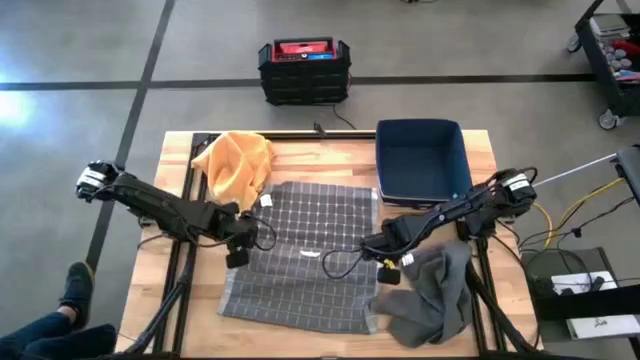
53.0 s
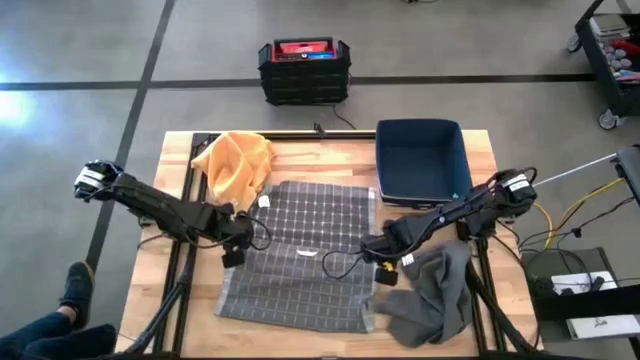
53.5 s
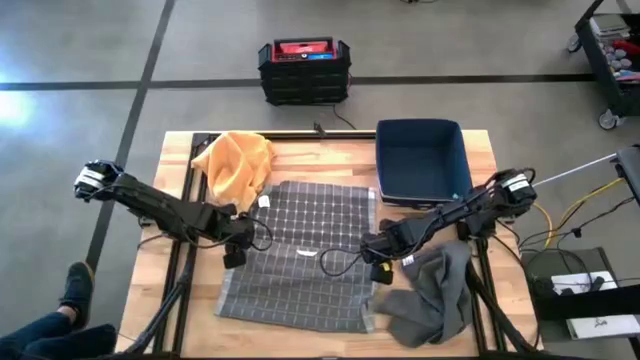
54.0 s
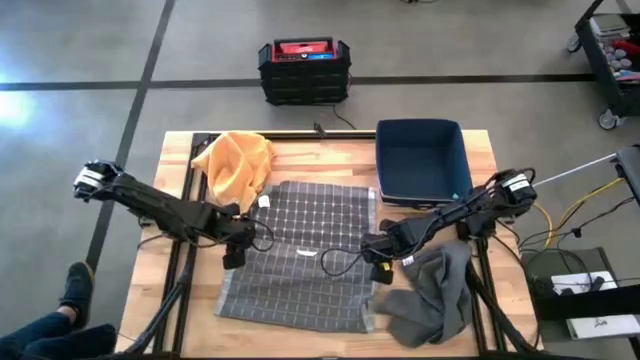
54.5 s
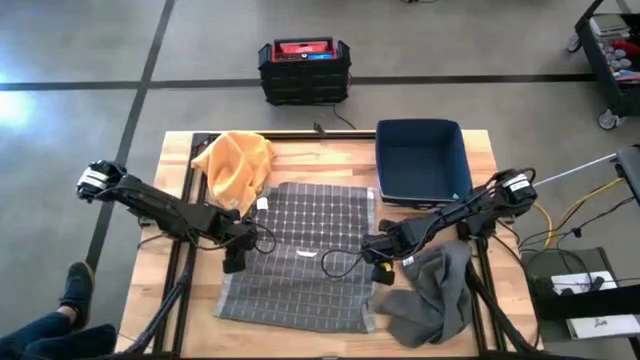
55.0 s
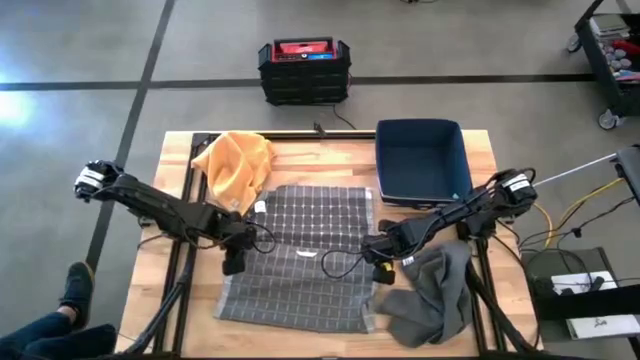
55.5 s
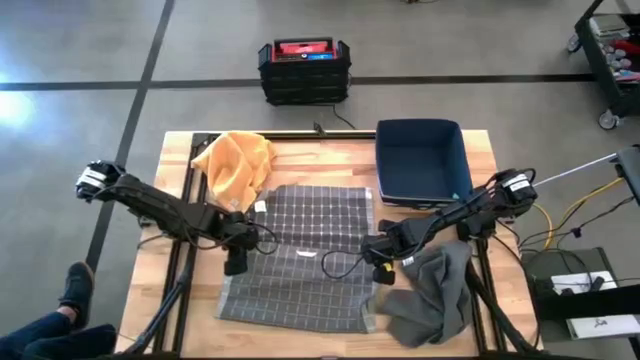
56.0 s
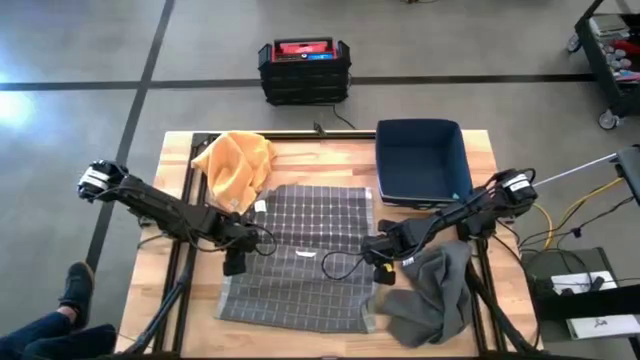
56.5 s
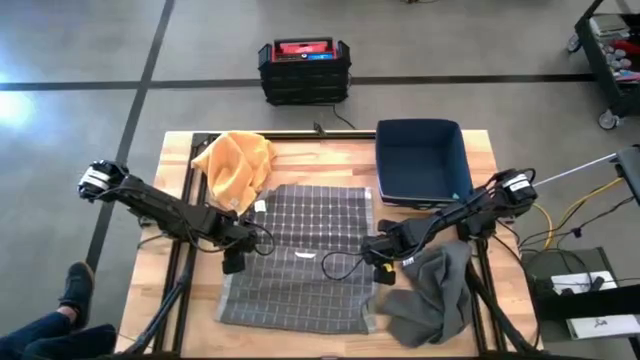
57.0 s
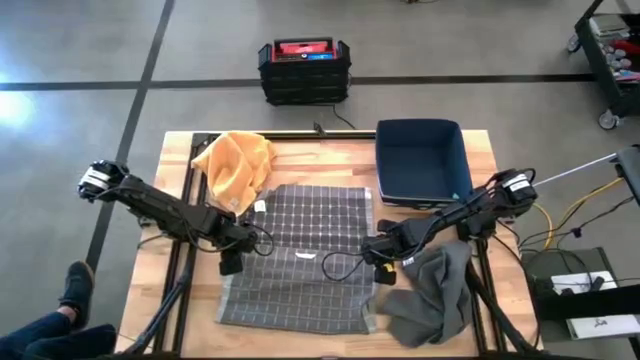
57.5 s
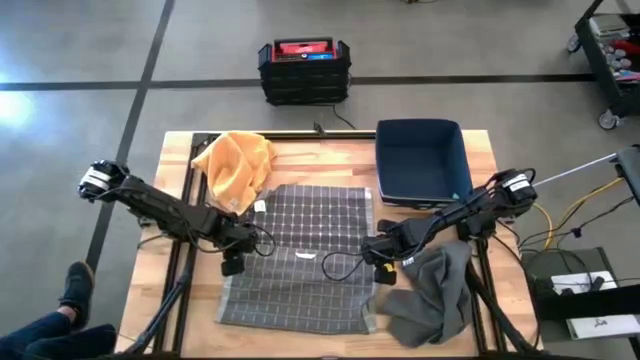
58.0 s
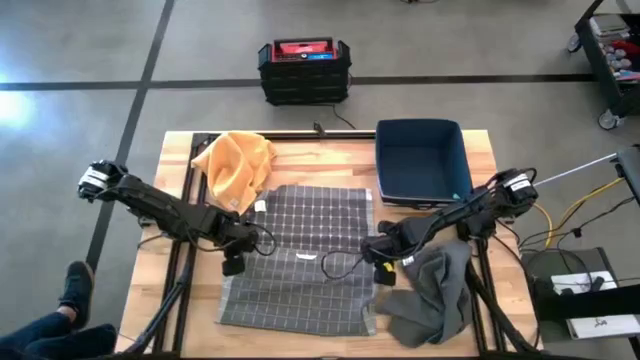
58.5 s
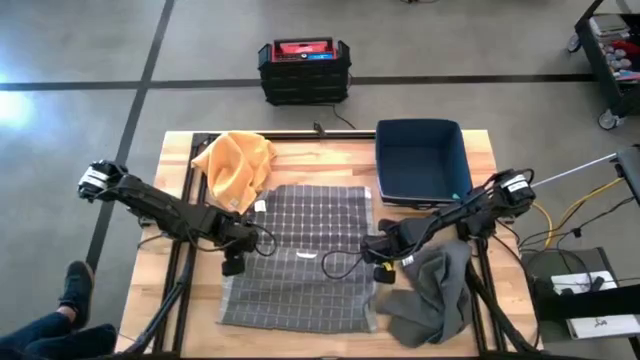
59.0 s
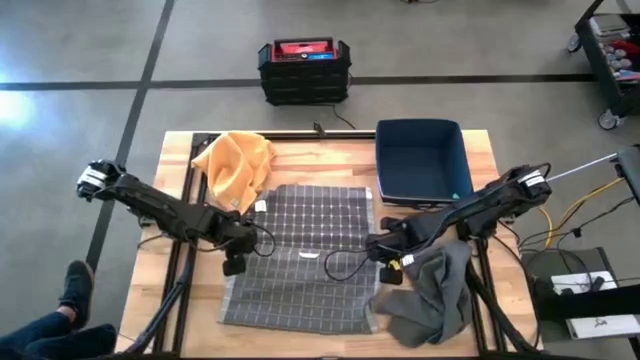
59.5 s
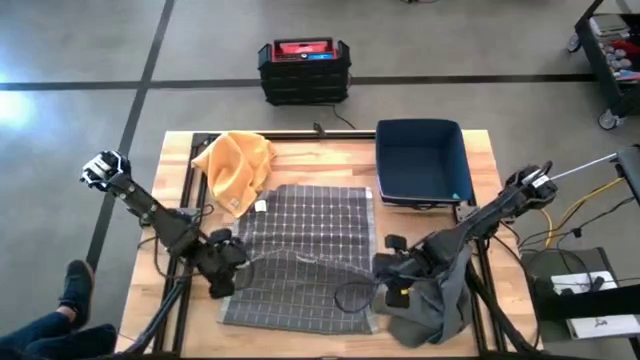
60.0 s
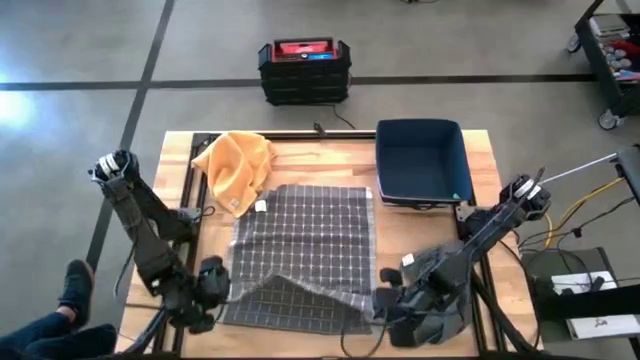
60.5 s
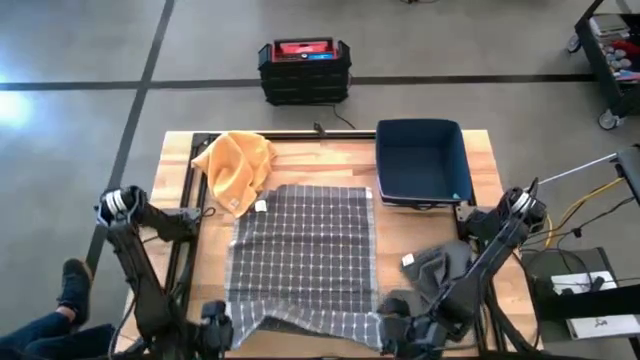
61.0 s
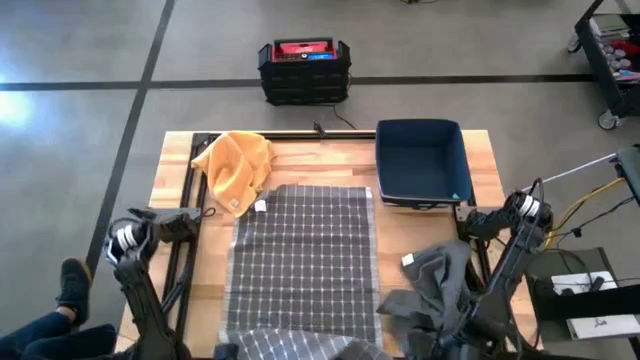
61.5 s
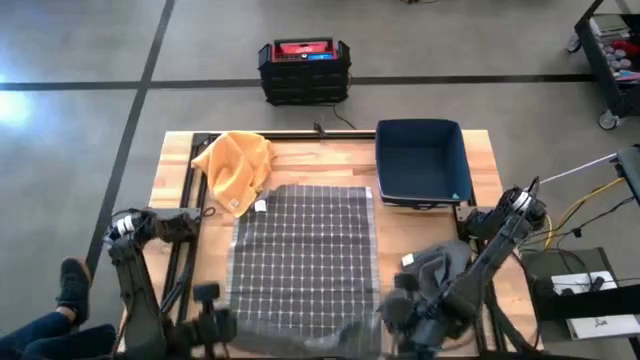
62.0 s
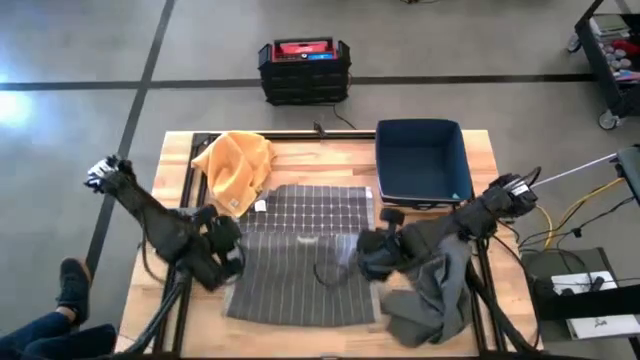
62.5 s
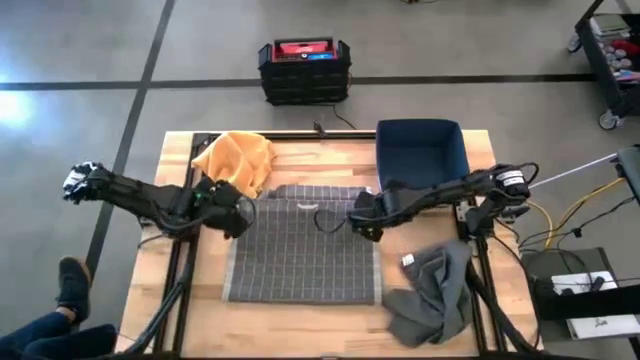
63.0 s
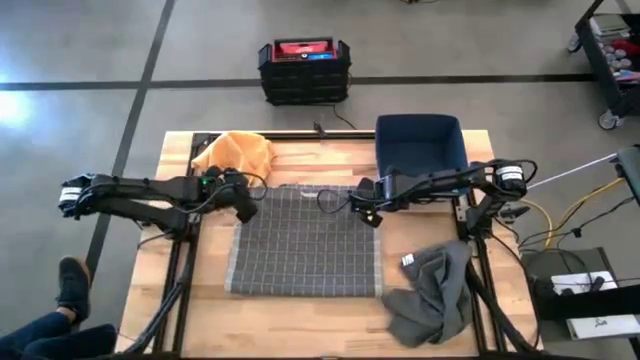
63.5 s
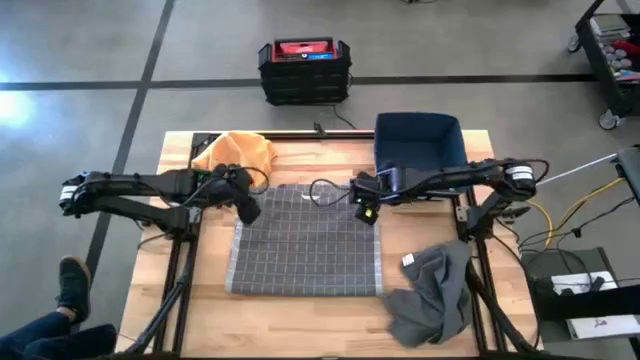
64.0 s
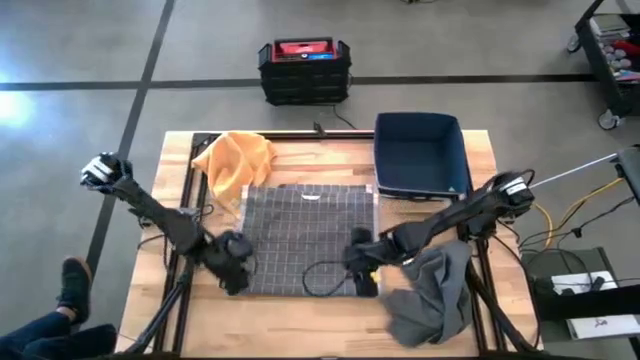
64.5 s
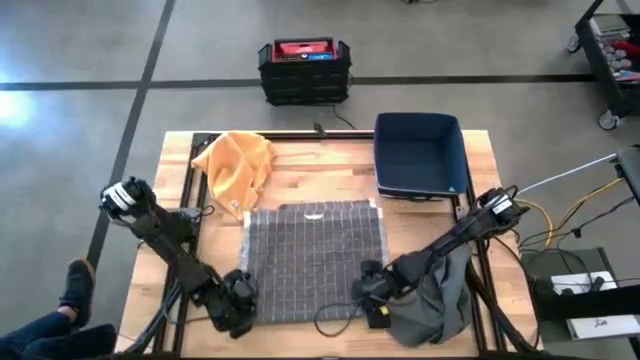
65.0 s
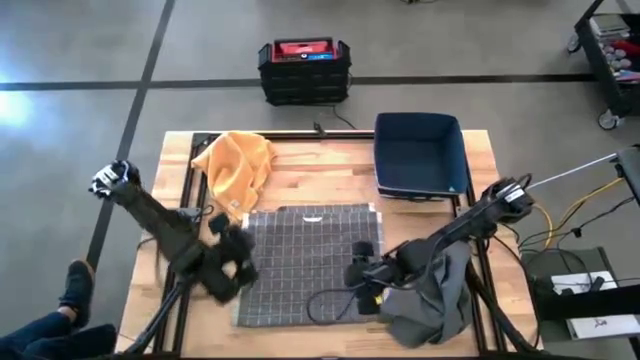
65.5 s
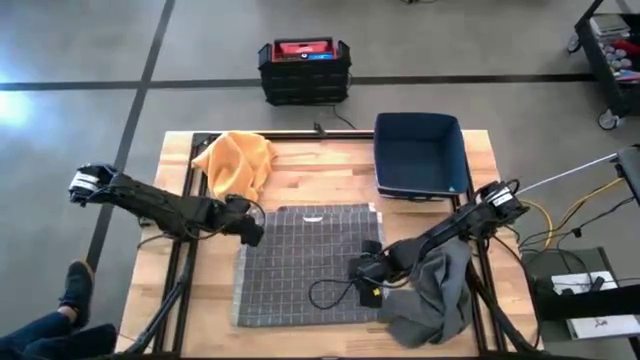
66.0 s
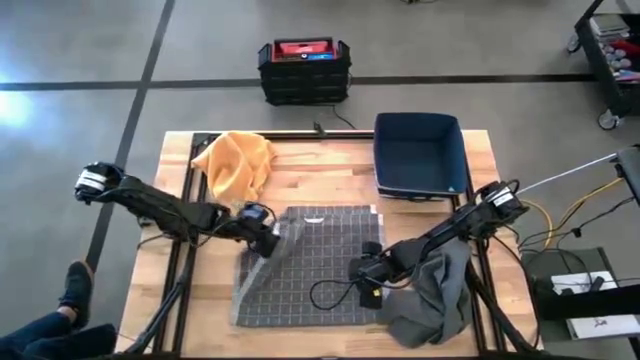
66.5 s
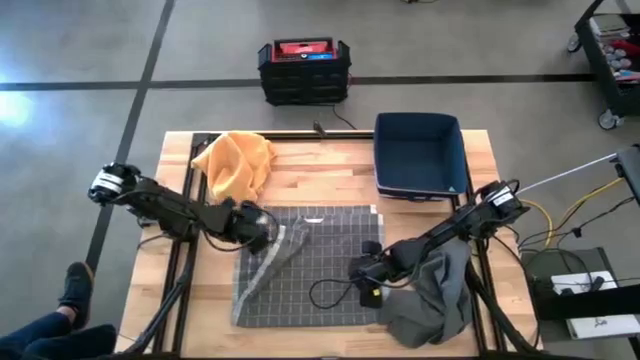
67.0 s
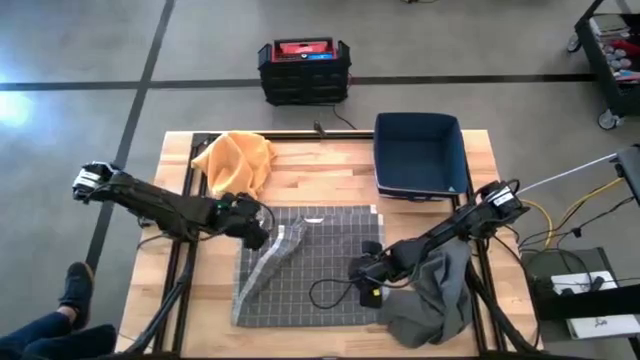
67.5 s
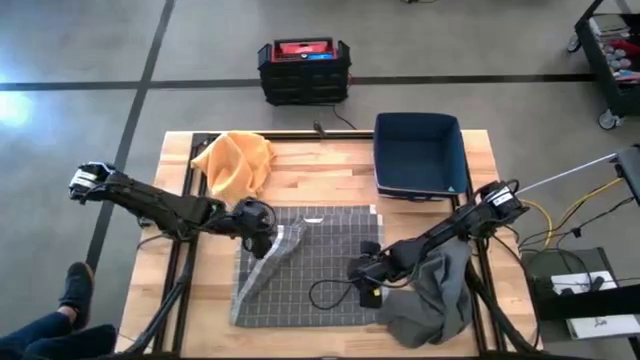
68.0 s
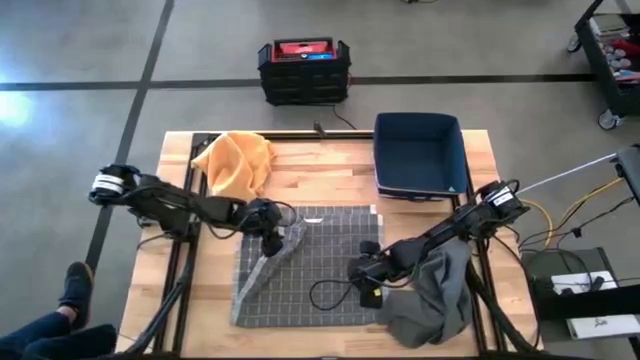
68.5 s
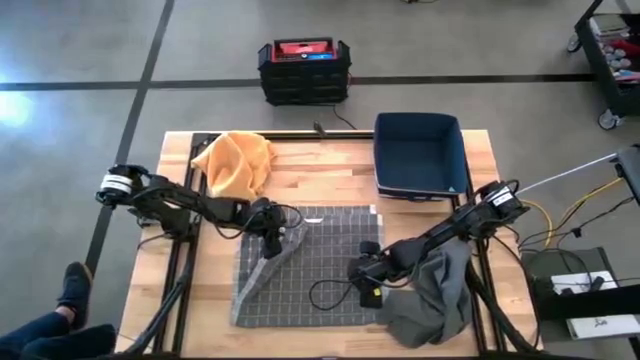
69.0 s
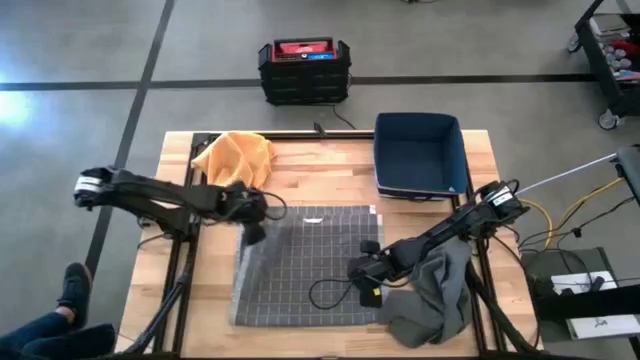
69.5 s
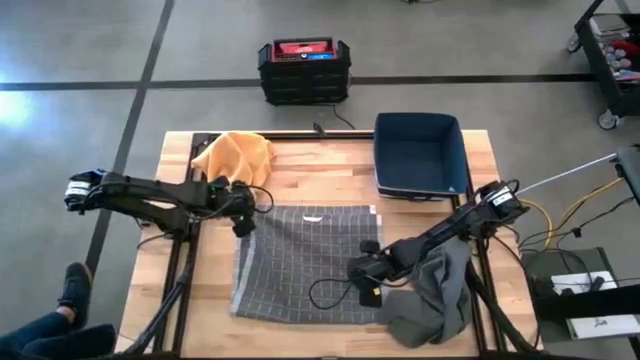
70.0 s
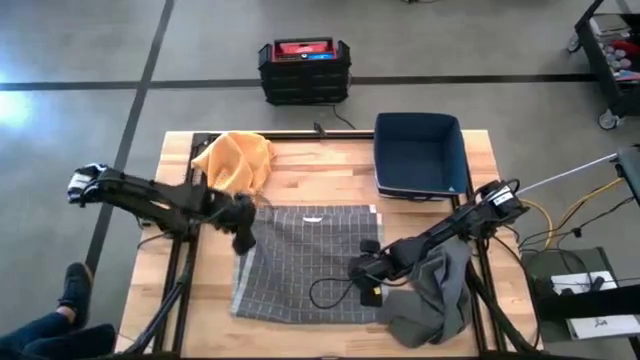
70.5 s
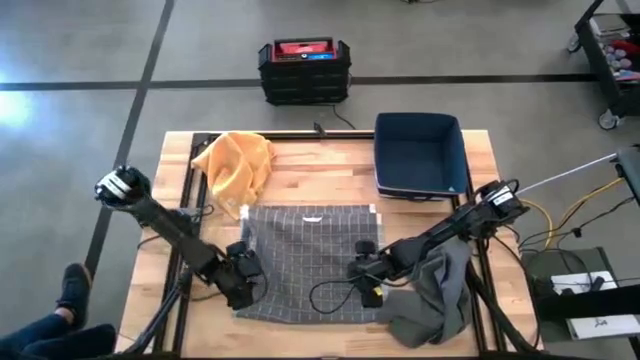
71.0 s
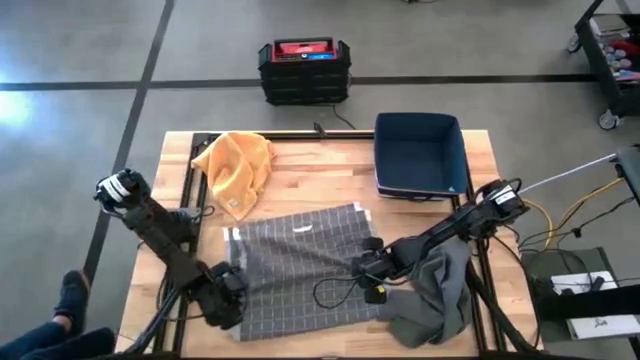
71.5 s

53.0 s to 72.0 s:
Task: Fold towel
Fold the gray patterned kitchen towel

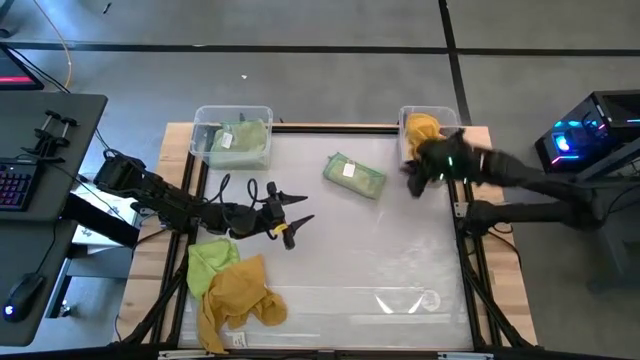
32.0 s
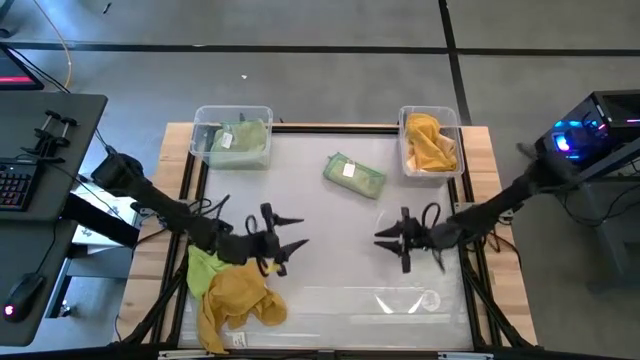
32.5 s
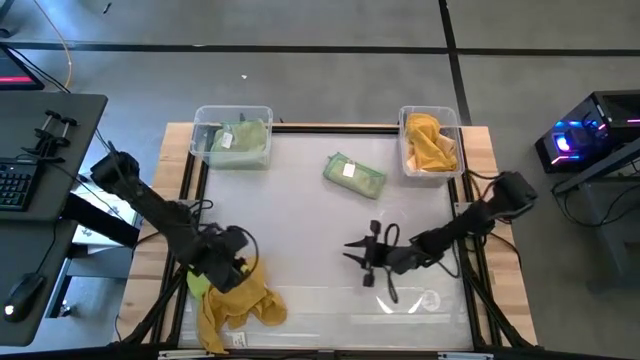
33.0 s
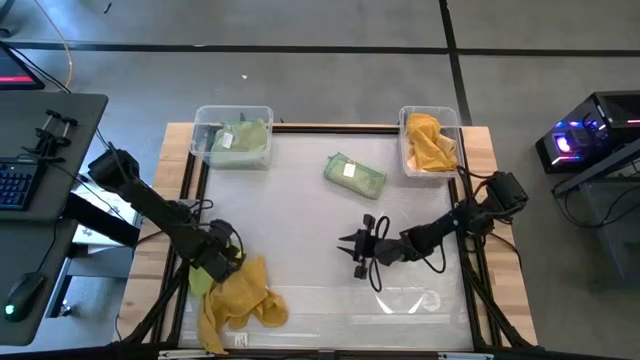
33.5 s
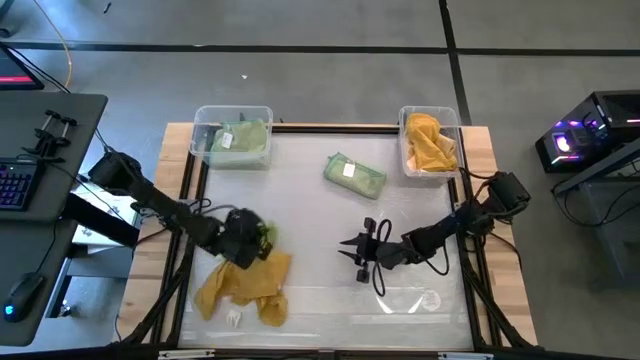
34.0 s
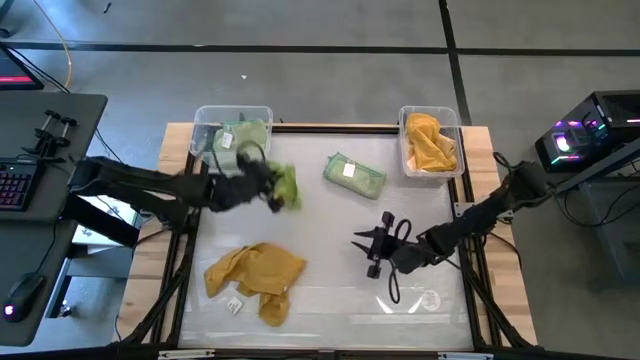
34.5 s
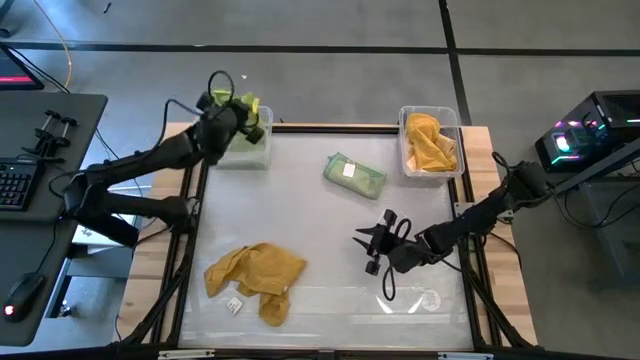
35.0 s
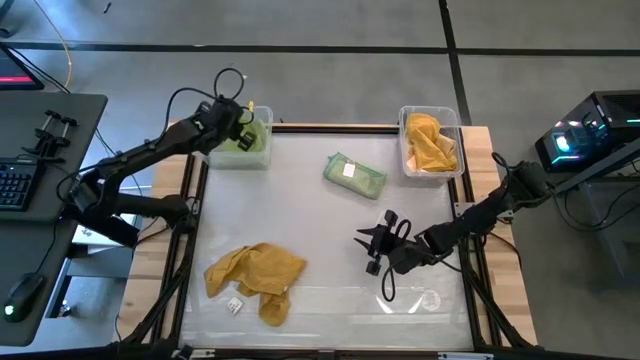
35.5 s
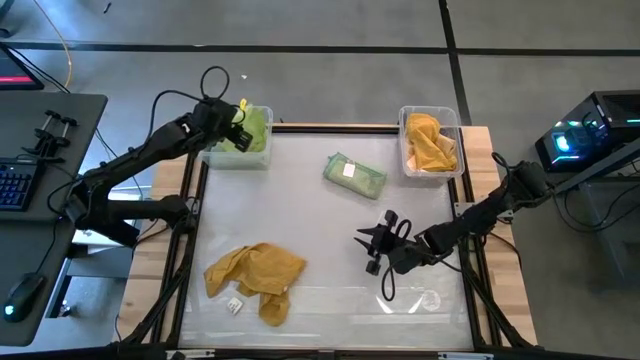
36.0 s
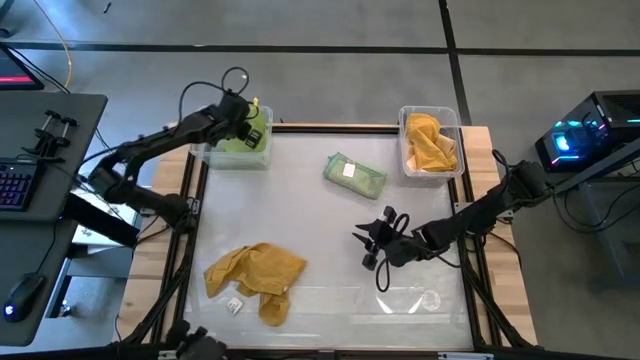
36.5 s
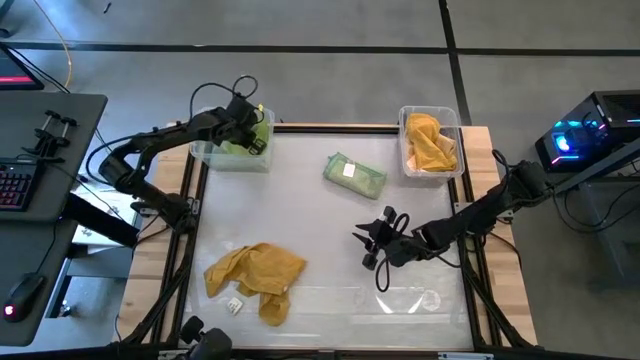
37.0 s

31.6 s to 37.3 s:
Task: Sort towels by color in basket
Put the light green microfiber towel into the left transparent bin
